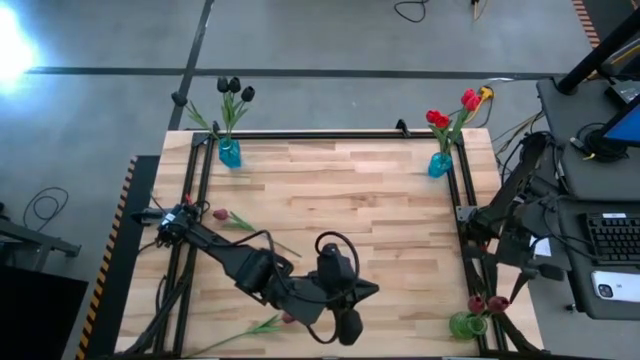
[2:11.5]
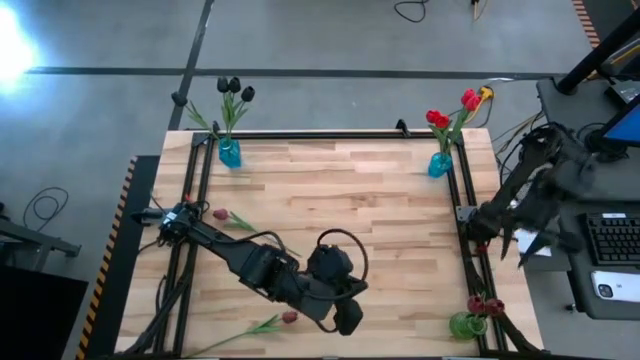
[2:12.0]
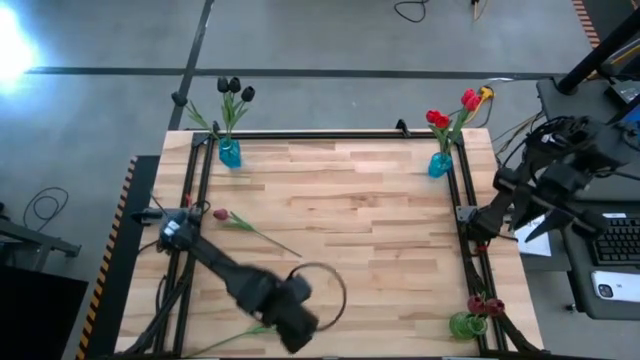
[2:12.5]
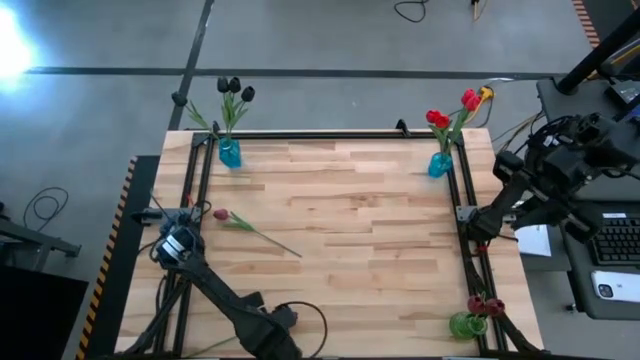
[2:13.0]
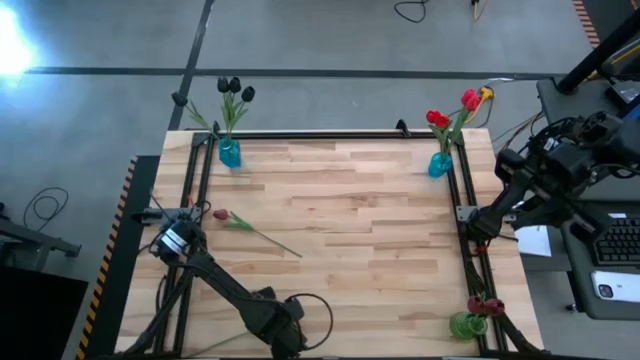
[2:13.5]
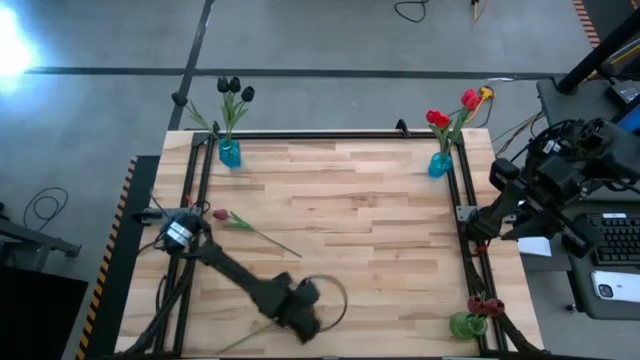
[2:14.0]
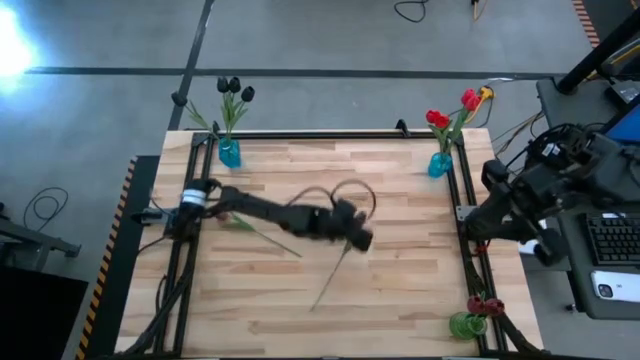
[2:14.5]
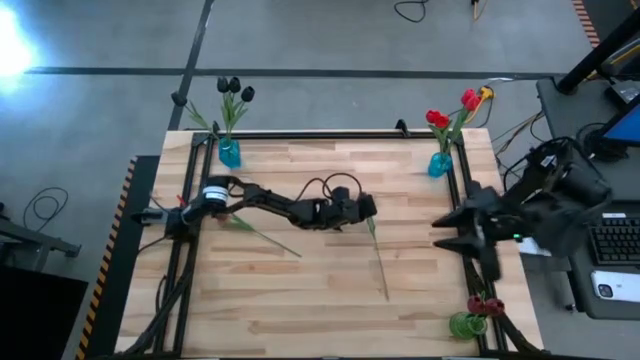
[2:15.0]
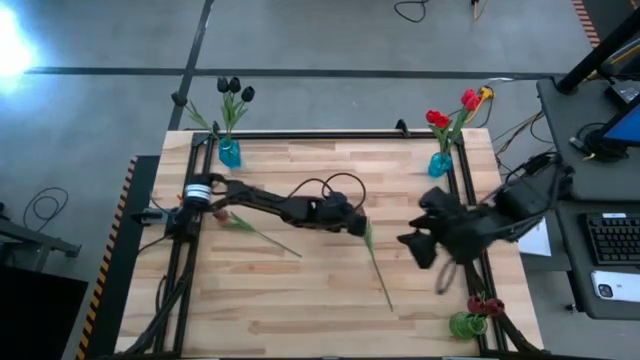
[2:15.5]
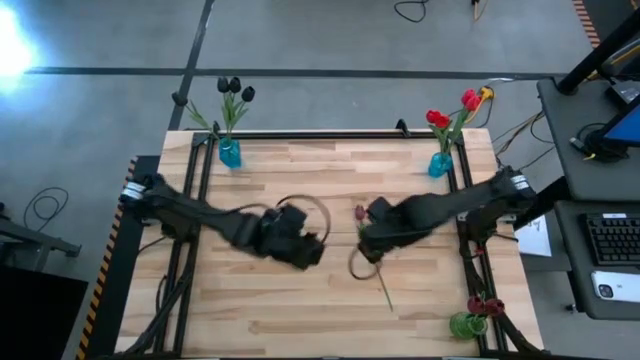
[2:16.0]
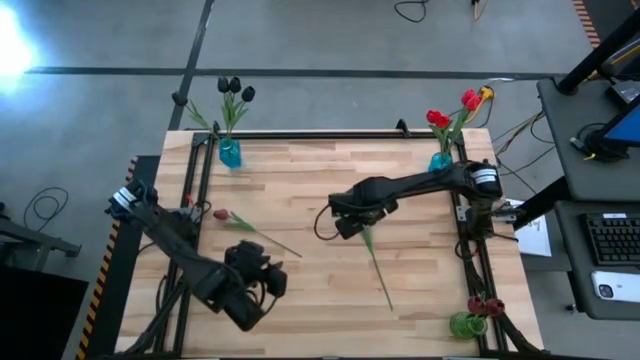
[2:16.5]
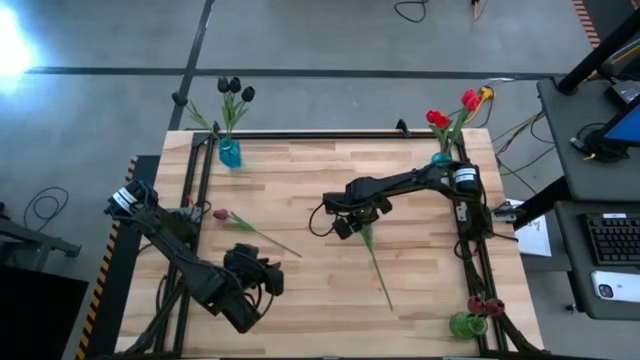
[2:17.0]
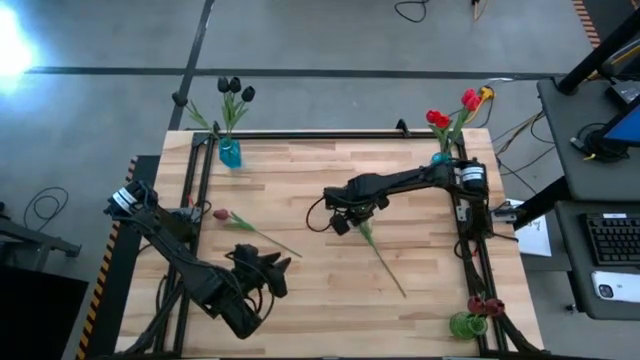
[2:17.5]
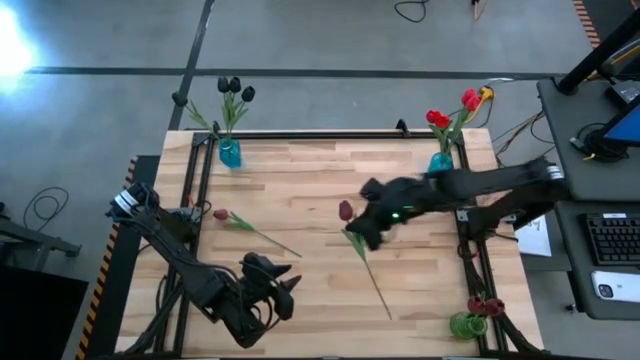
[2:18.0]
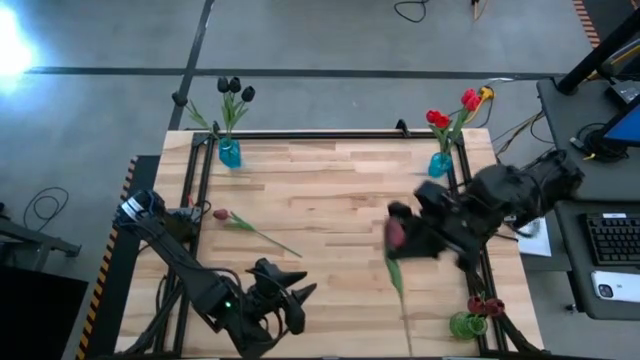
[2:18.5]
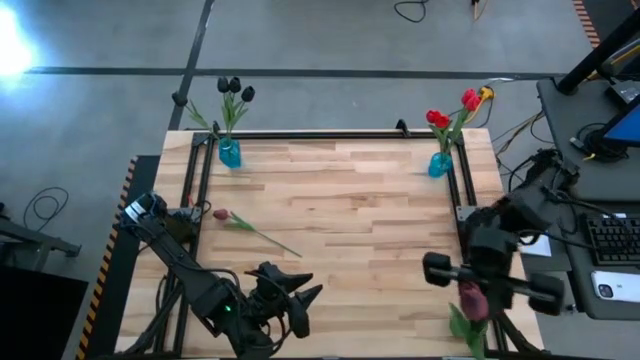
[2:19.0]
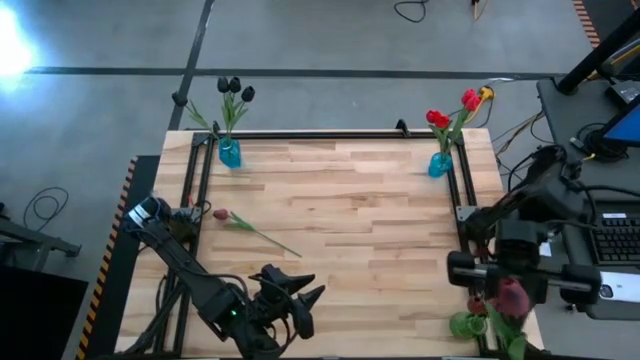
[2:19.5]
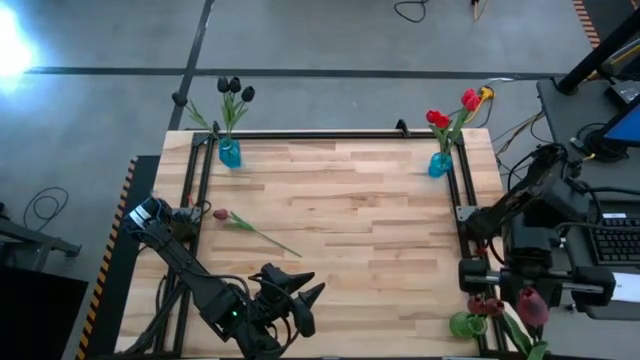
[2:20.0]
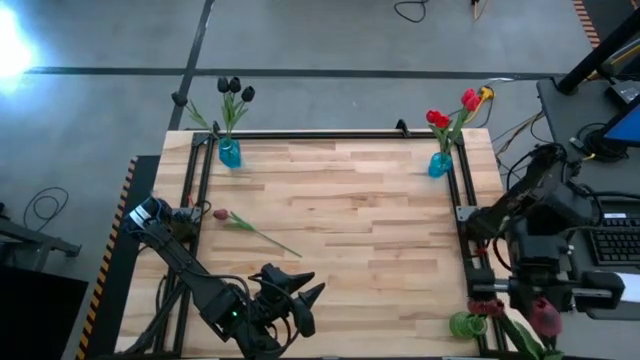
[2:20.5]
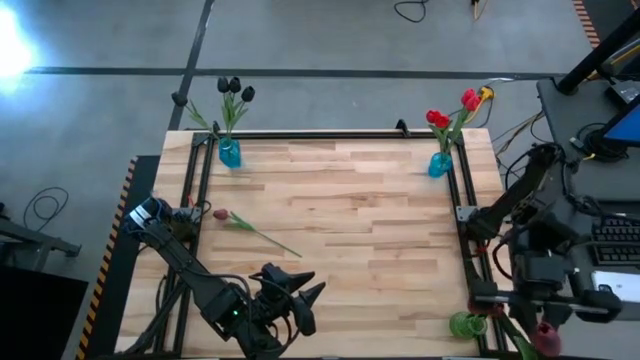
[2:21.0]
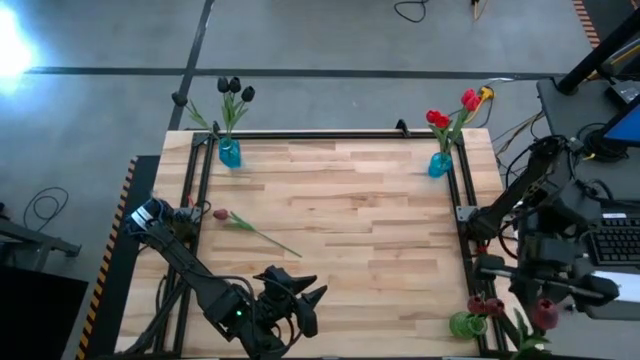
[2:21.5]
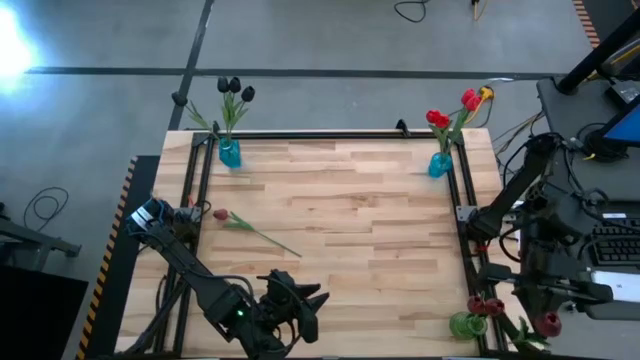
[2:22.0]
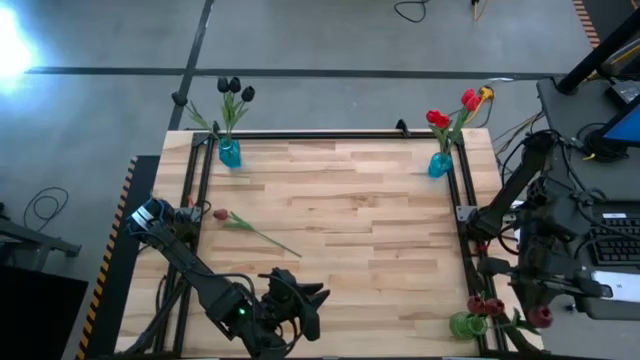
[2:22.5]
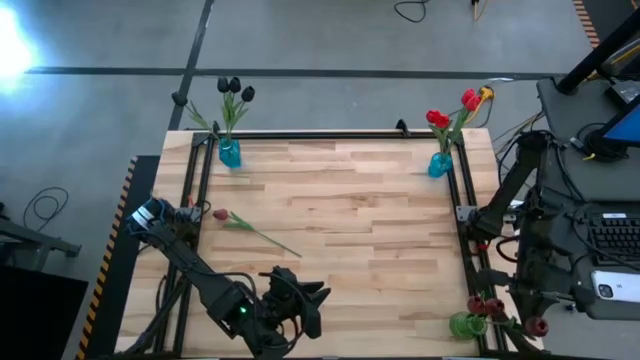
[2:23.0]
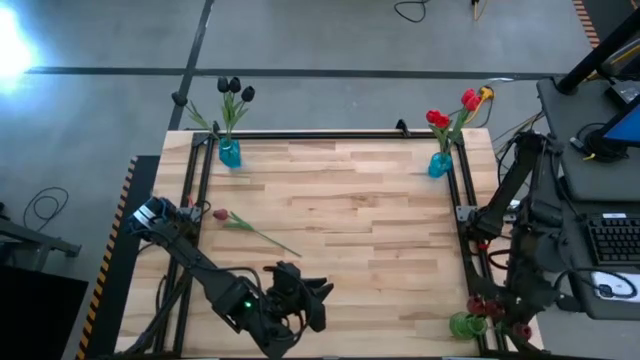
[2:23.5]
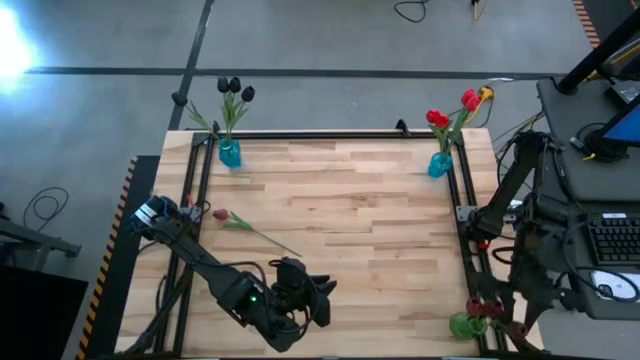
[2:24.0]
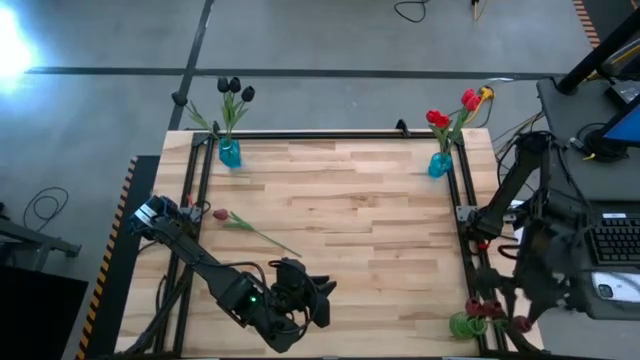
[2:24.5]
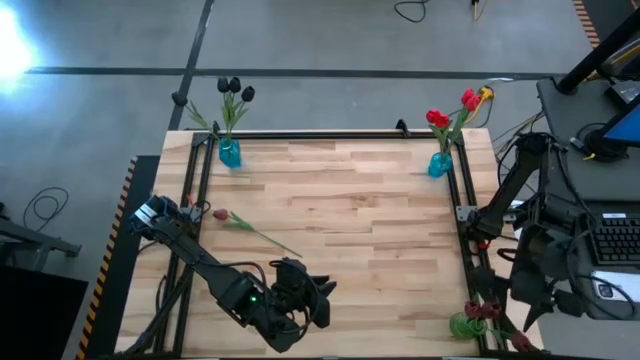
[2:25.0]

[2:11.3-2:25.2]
Task: Sort flowers into vase by color
Put the dark red tulip into the green vase

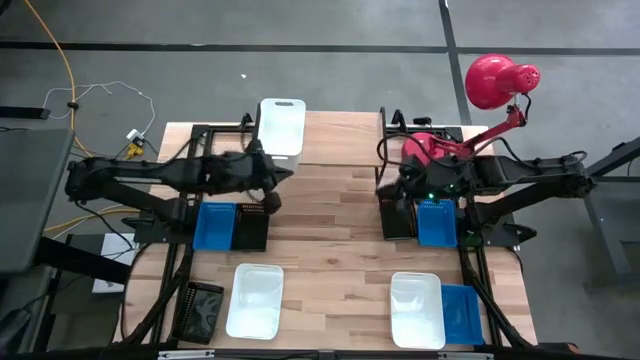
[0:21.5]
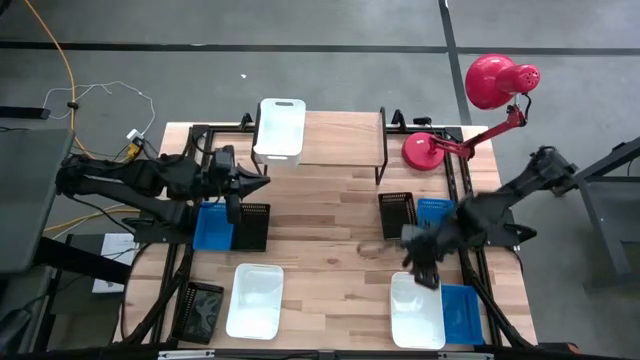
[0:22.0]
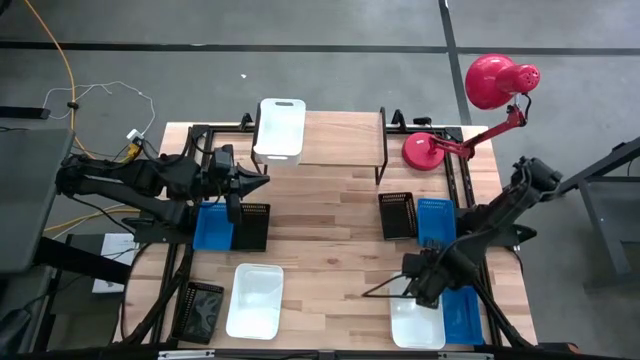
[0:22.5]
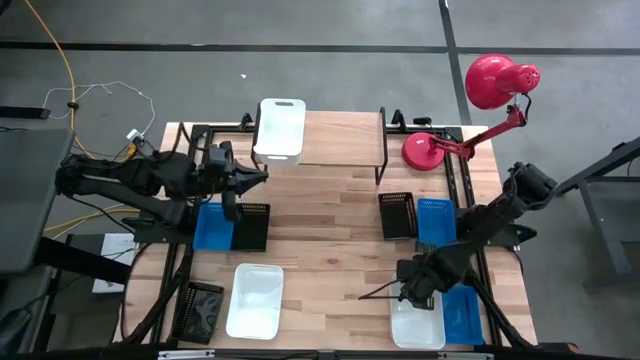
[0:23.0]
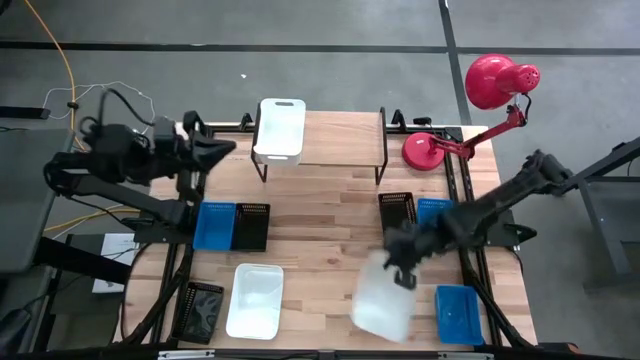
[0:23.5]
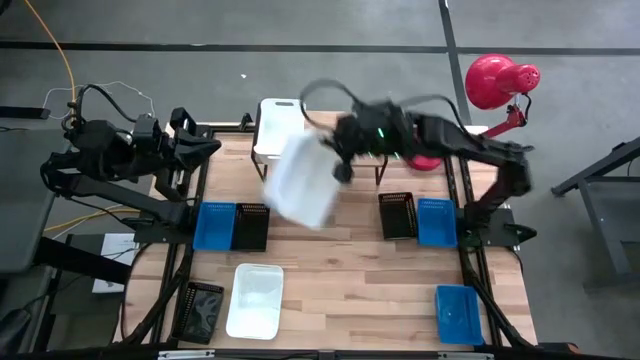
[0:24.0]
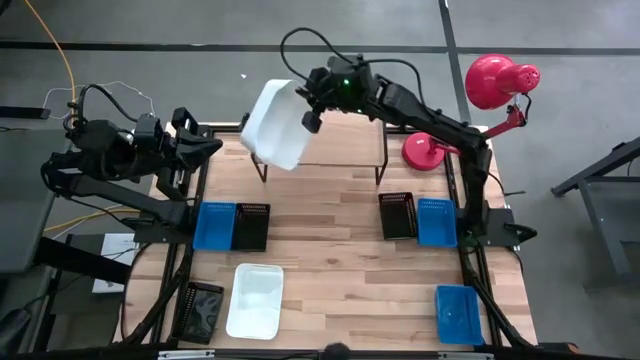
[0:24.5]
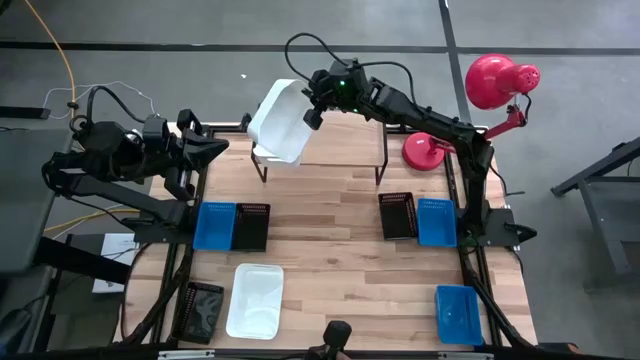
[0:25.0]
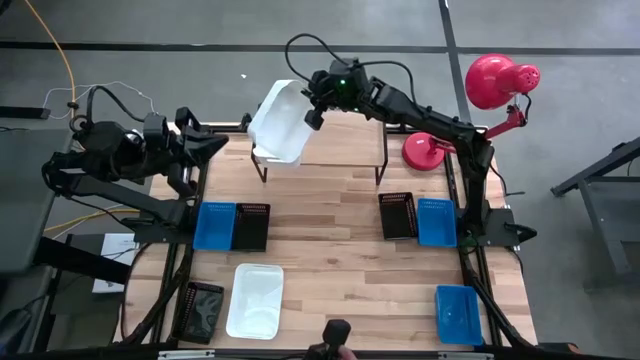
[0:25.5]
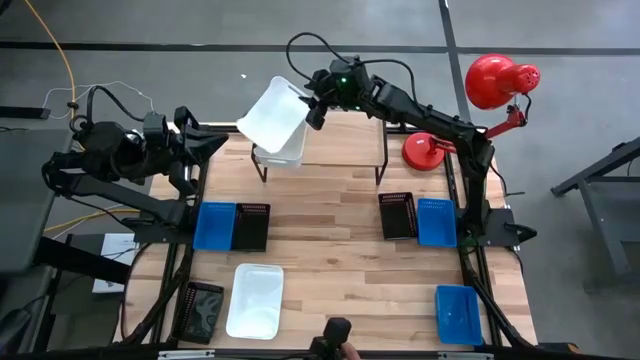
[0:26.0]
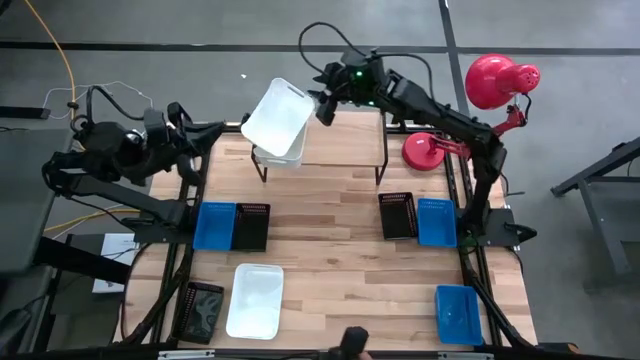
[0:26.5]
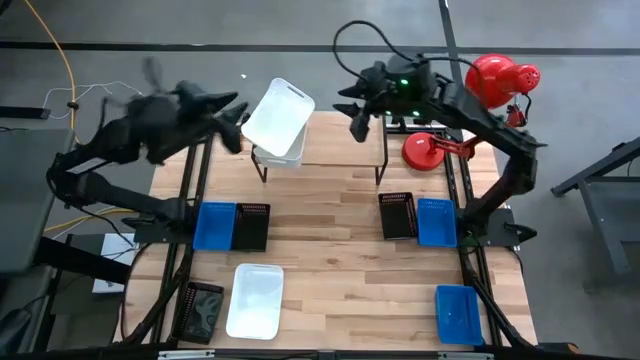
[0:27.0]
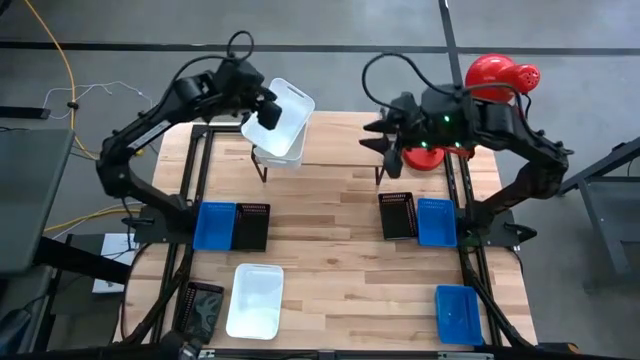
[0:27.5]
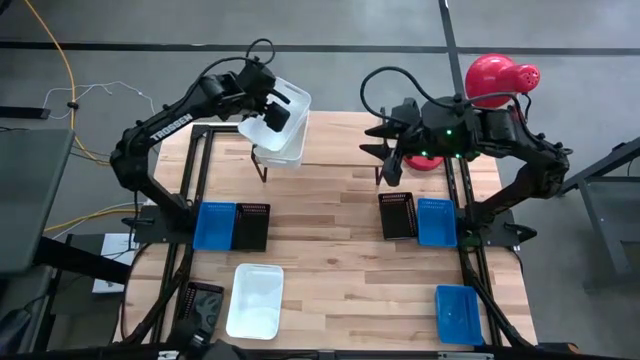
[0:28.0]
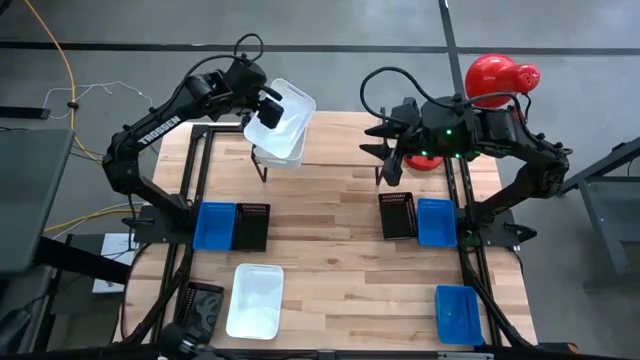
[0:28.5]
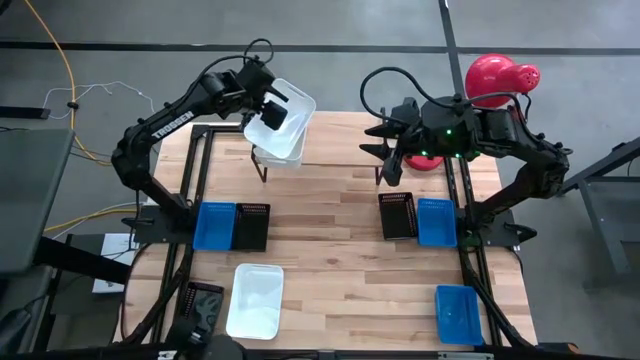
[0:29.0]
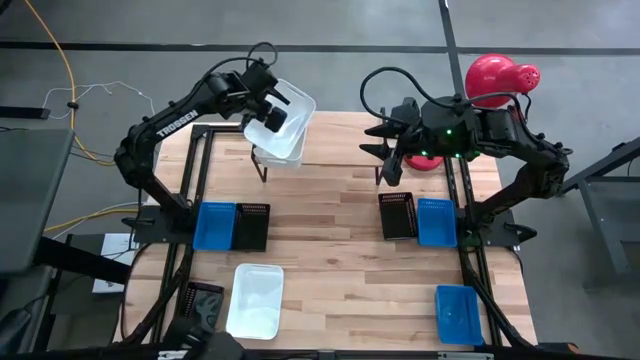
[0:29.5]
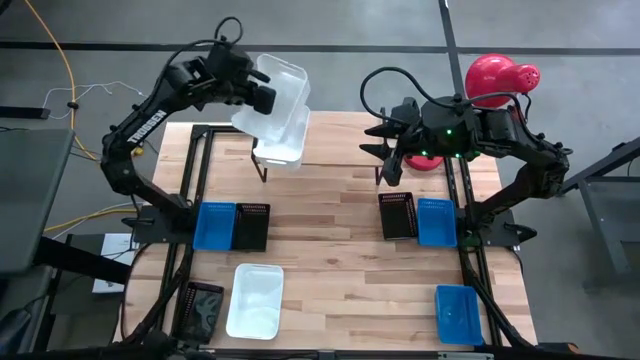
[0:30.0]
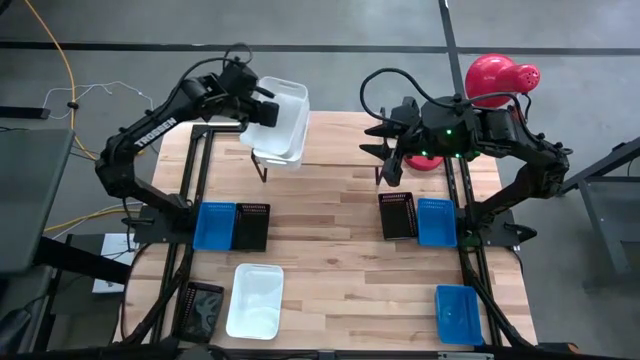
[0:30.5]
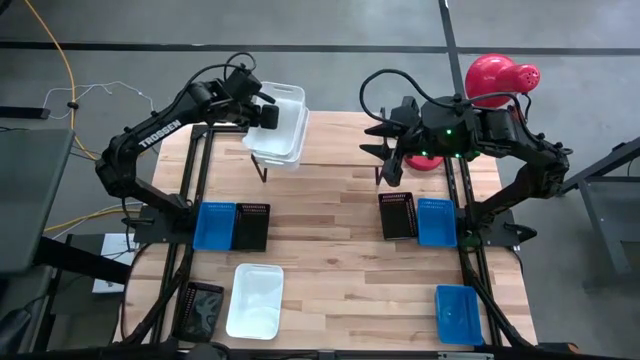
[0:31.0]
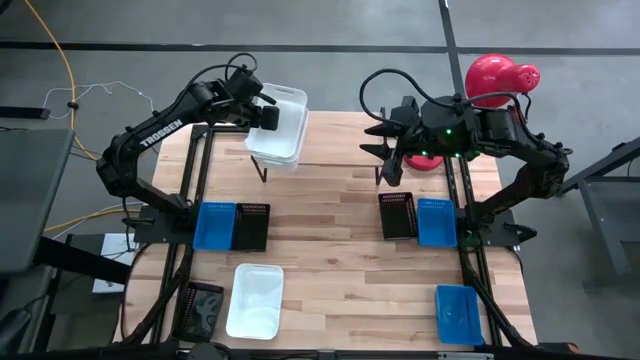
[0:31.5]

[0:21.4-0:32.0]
Task: Stack baskets on shelf by color
Stack the right white bin on top of the white bin on the shelf
